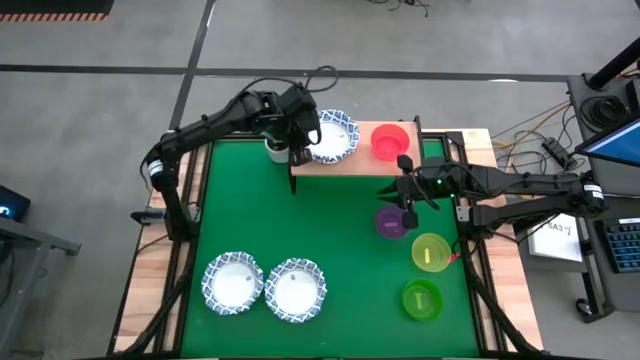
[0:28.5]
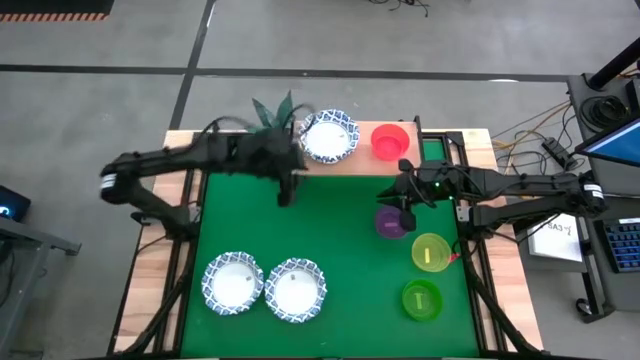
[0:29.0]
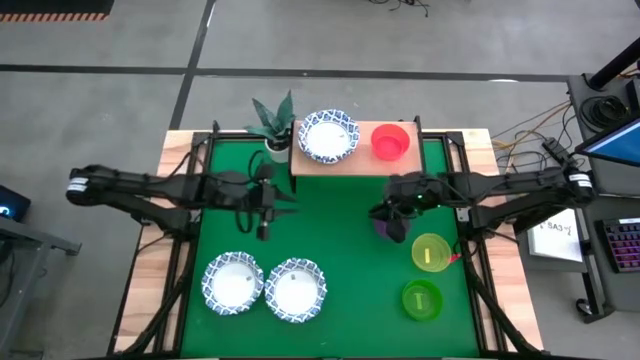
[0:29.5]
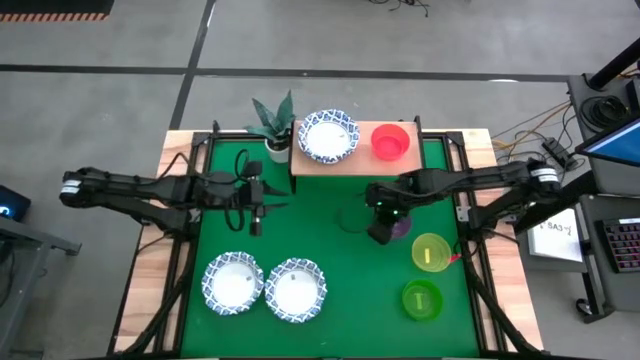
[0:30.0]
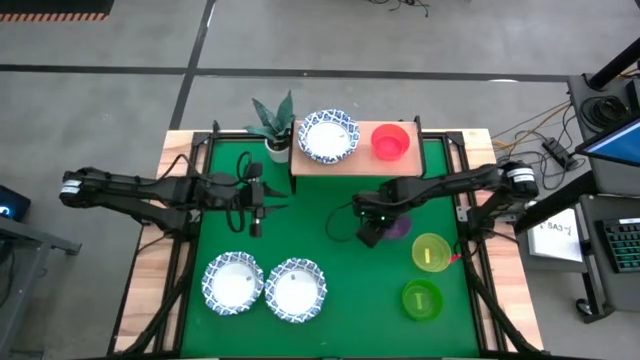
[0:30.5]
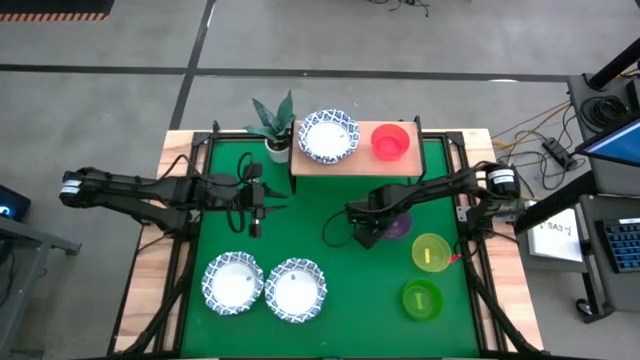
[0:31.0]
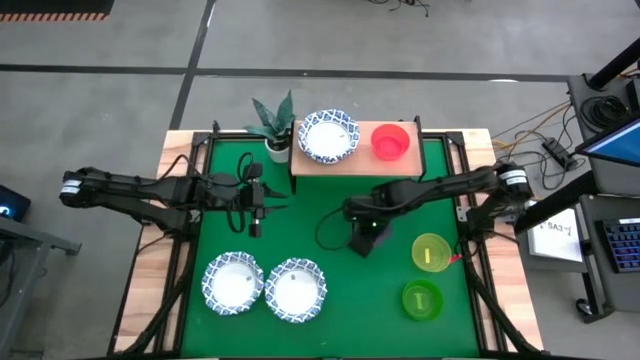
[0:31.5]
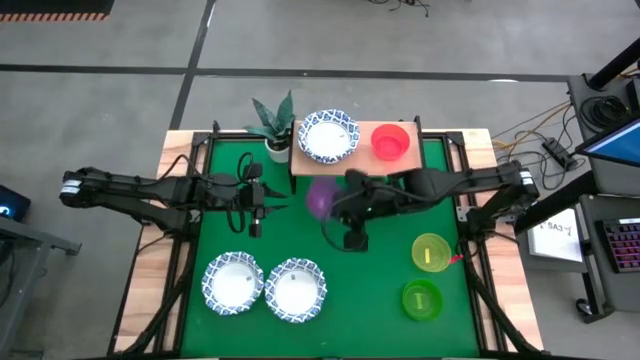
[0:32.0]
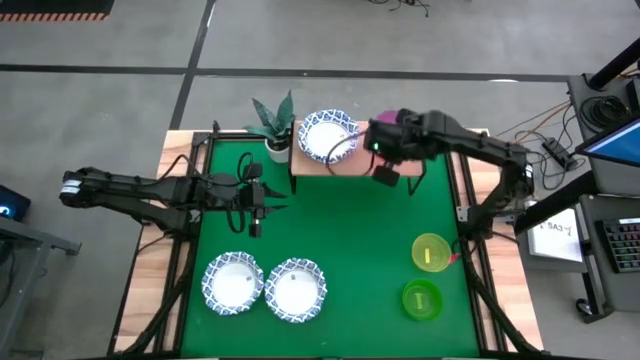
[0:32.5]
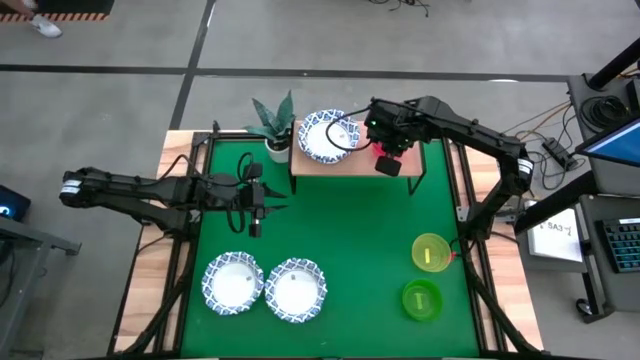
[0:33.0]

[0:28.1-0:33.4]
Task: Place and stack bowls onto a shelf
Stack the violet bowl on top of the red bowl on the shelf

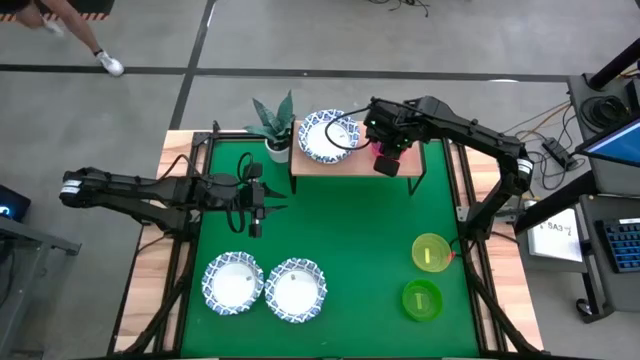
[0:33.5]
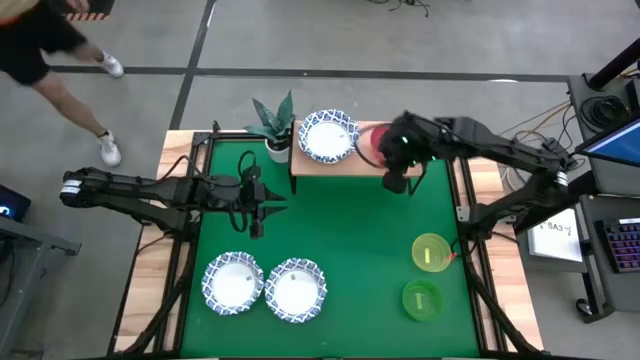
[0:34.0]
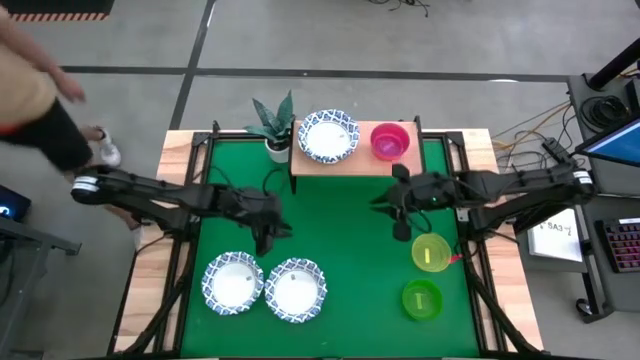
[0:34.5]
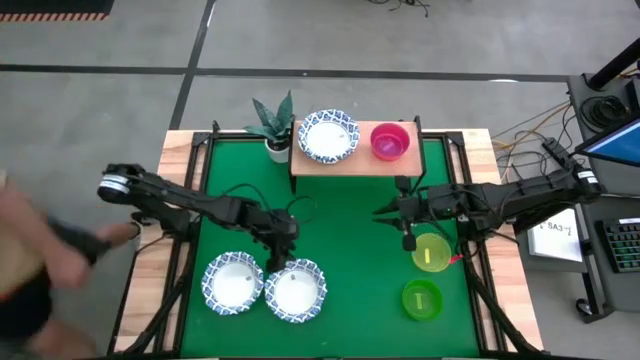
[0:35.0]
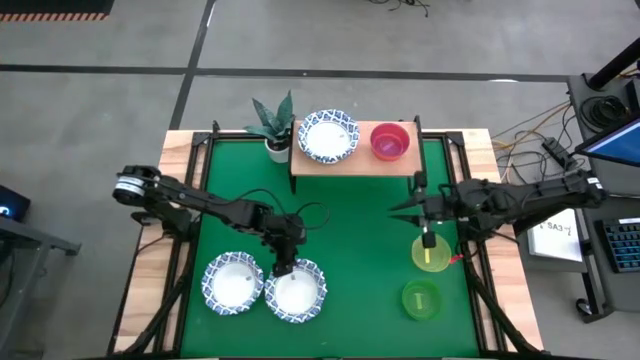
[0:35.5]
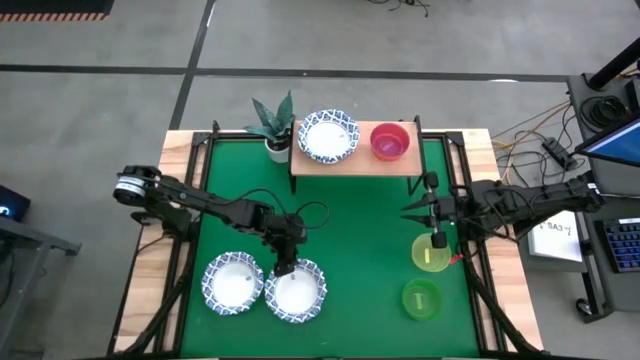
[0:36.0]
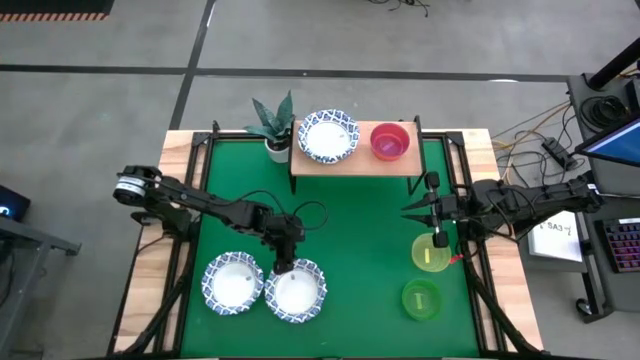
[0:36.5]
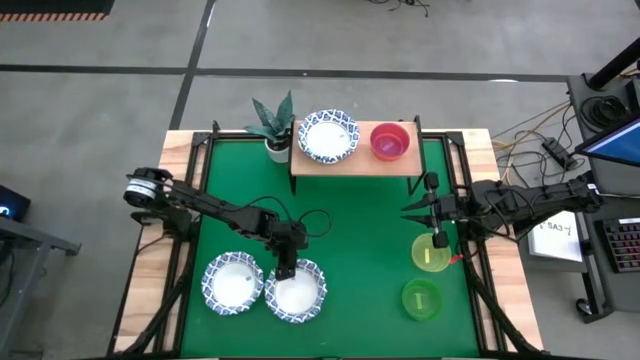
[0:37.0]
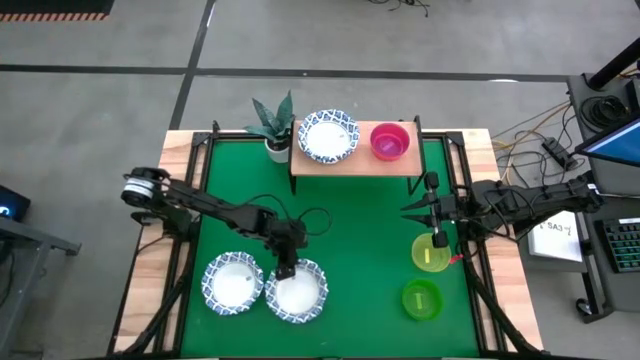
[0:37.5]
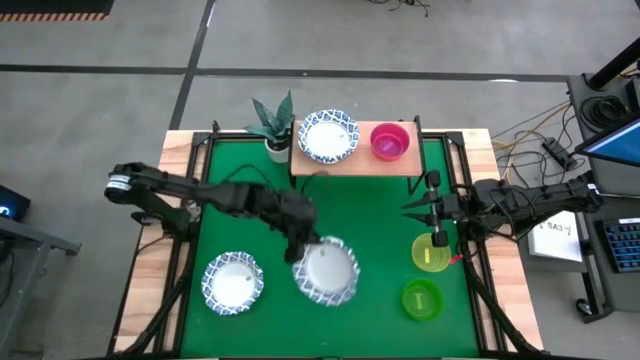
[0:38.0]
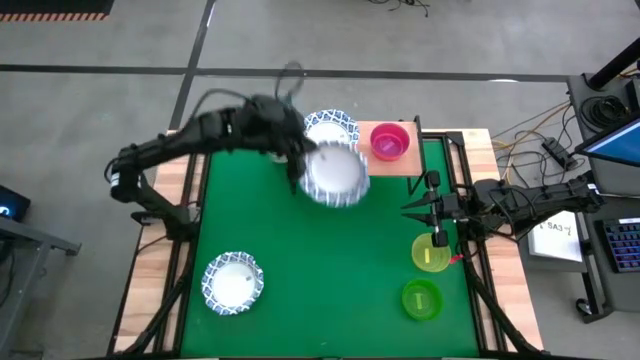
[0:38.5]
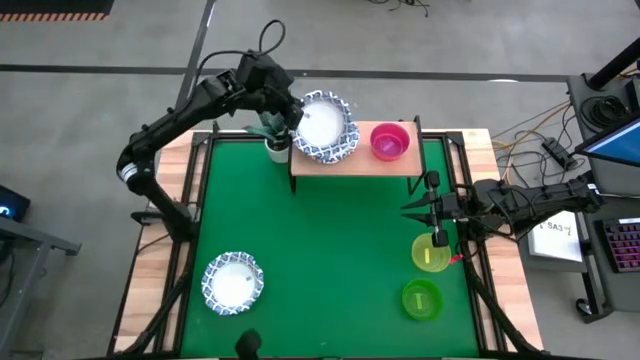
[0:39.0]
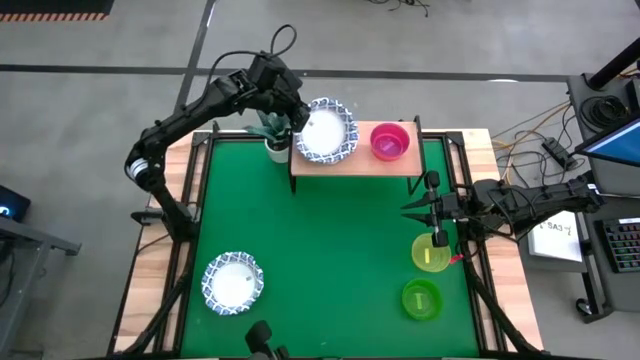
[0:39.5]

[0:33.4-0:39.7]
Stack the white patterned bowl on top of the white patterned bowl on the shelf

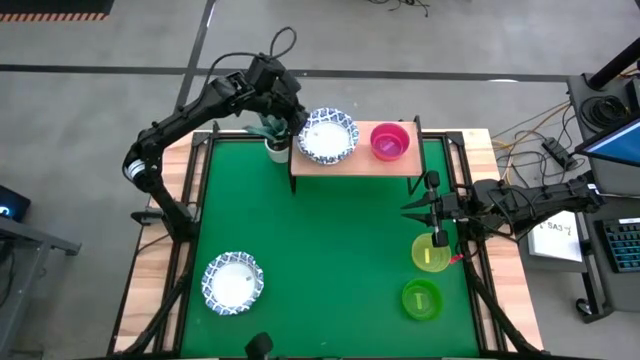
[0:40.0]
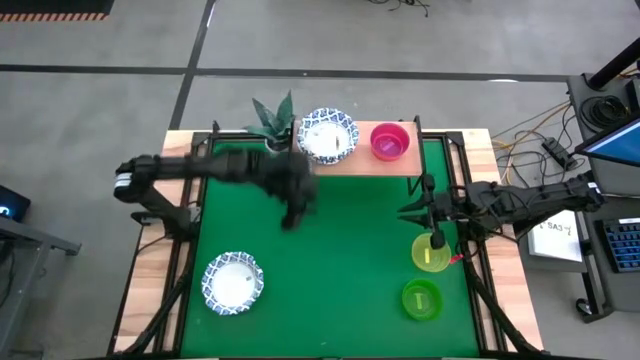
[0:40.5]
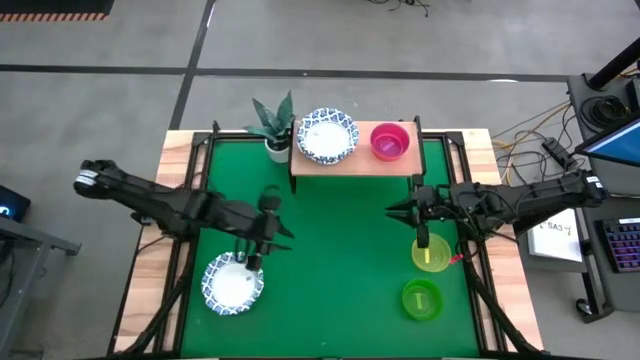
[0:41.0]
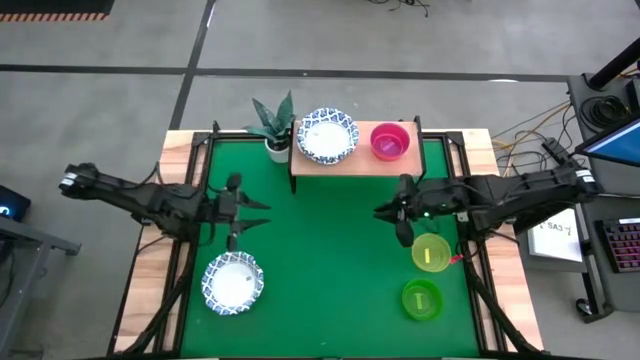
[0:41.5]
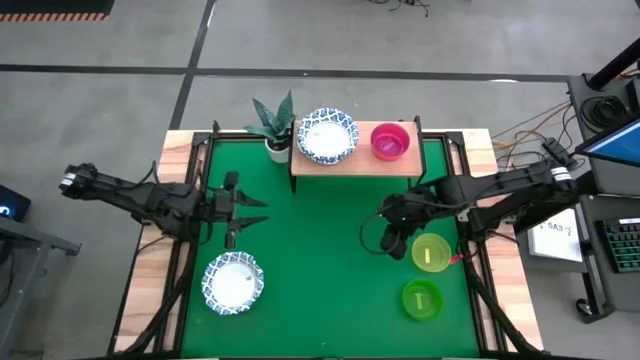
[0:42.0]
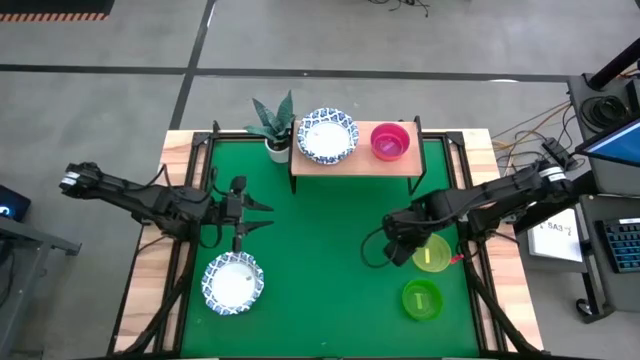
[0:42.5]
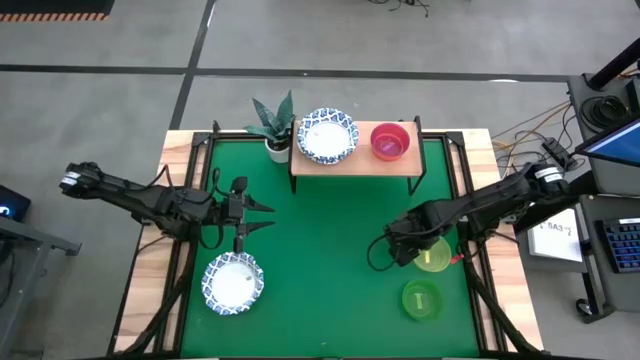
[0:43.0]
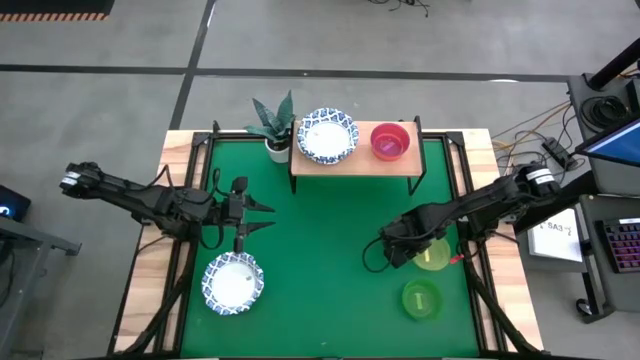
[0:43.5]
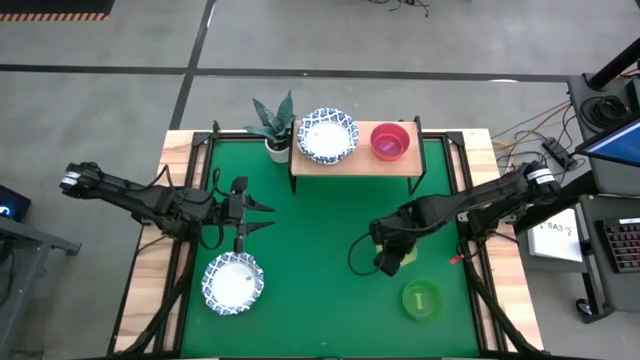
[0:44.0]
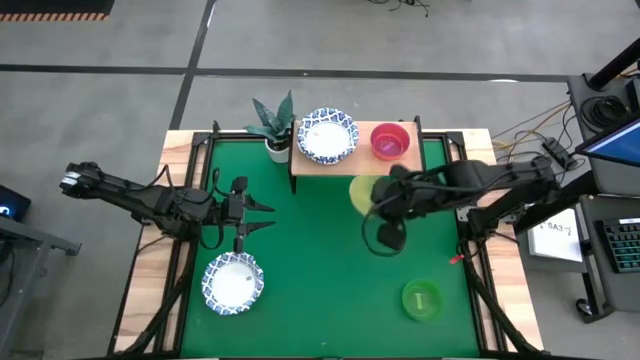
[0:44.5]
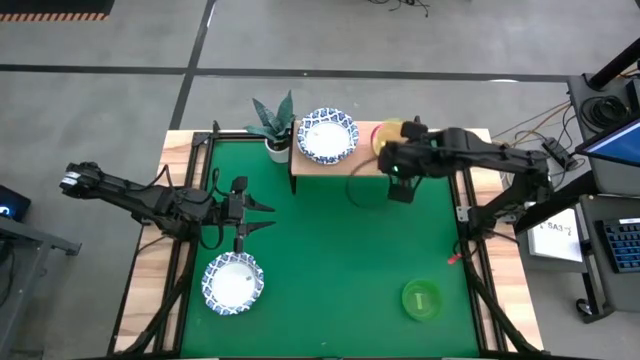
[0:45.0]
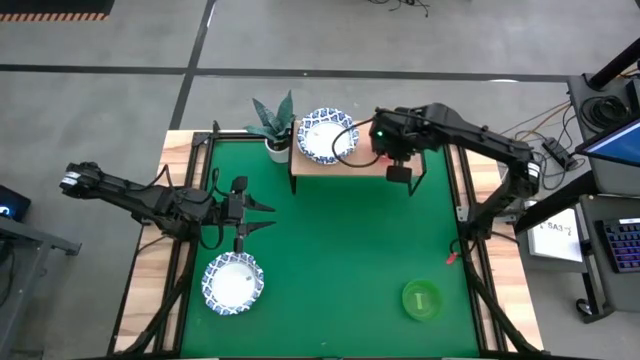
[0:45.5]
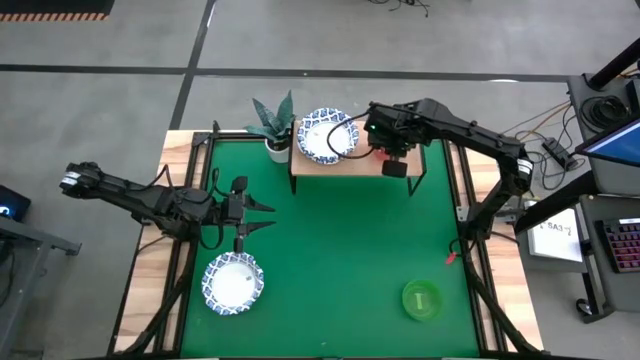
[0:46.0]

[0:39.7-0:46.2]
Stack the yellow bowl on top of the violet bowl on the shelf

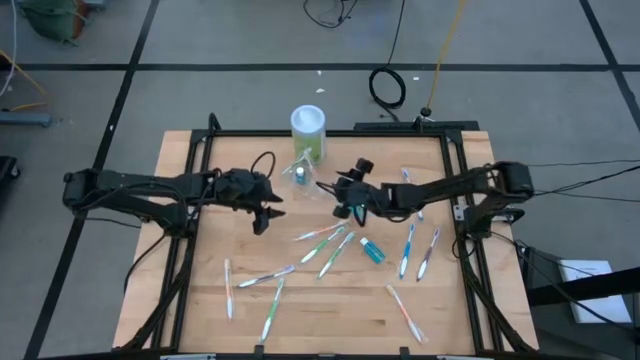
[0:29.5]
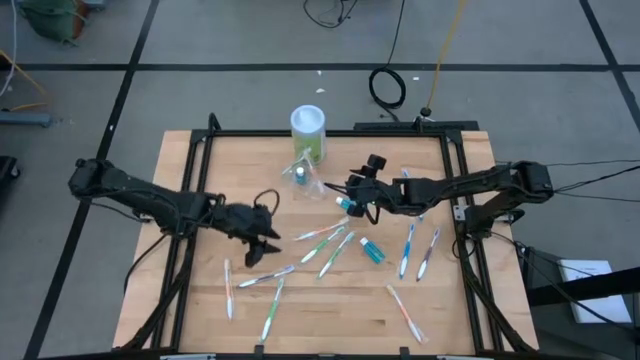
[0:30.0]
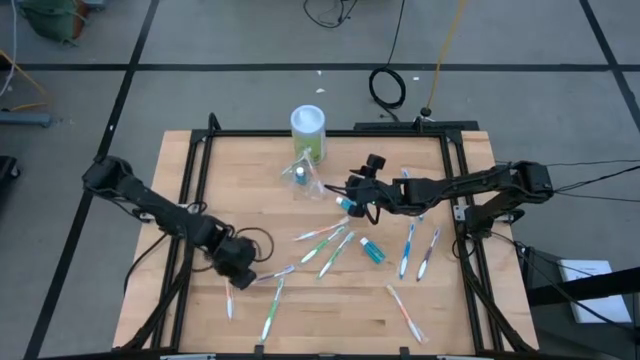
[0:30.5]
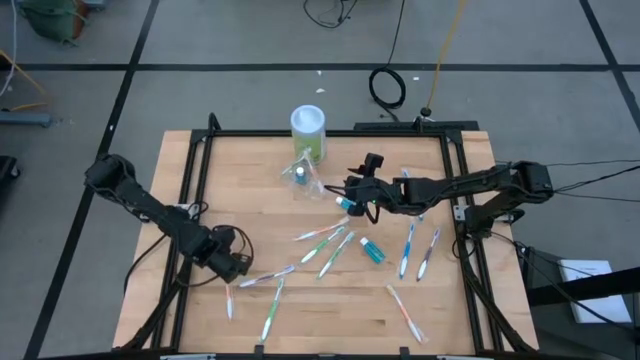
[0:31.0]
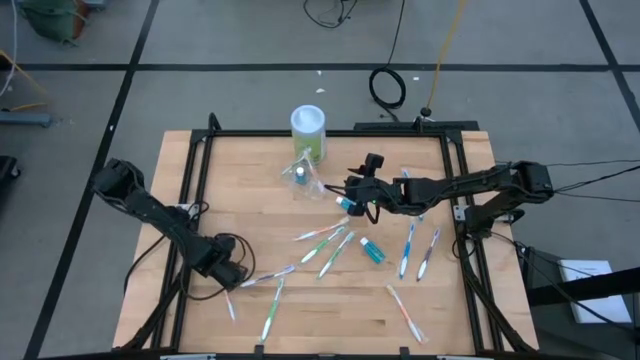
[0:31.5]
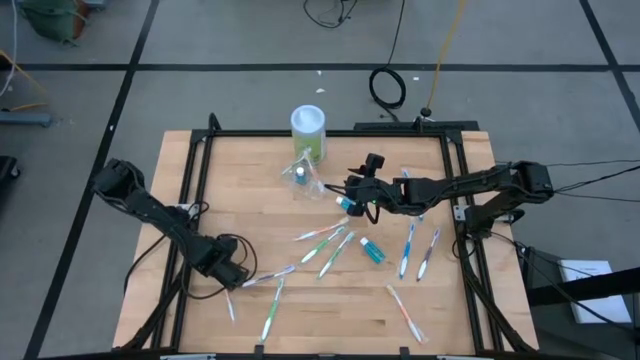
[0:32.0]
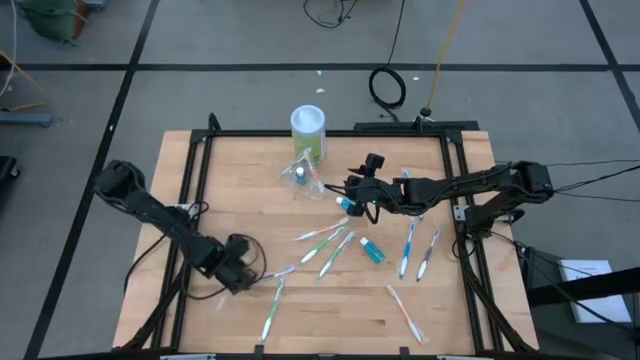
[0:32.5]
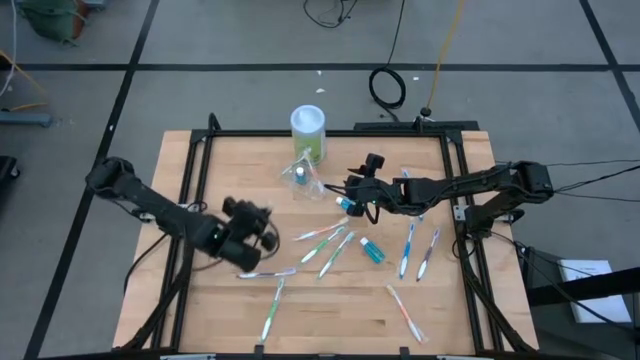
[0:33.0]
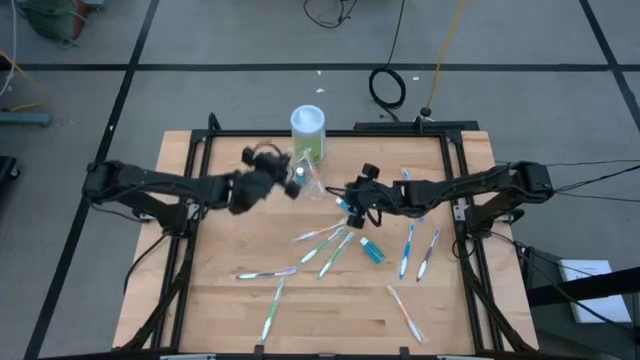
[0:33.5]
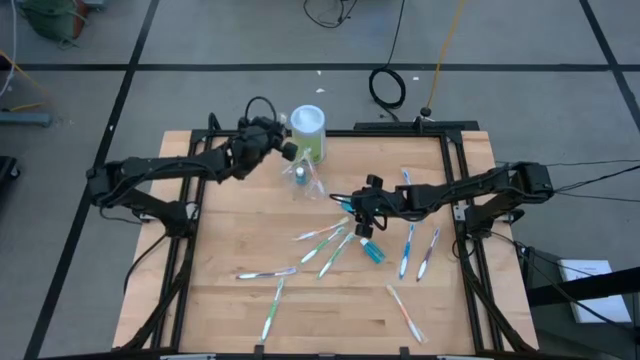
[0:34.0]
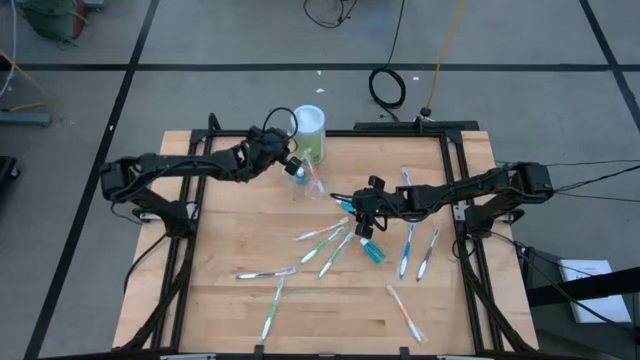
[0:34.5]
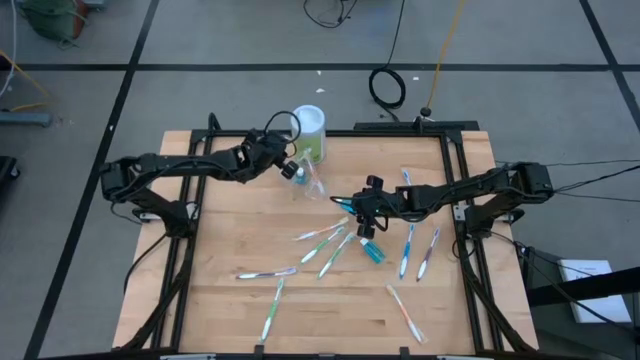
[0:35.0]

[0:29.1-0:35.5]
Task: Pick & Place toothbrushing station
Put the orange toothbrush into the left of the transparent organizer
